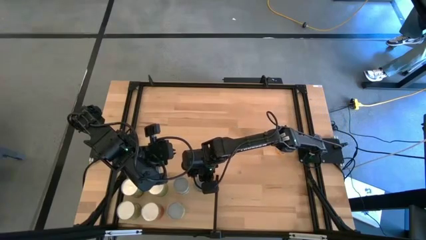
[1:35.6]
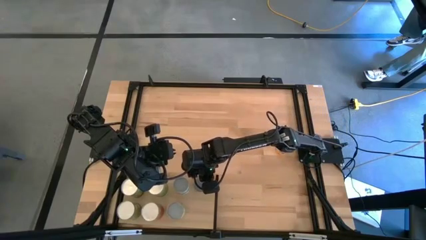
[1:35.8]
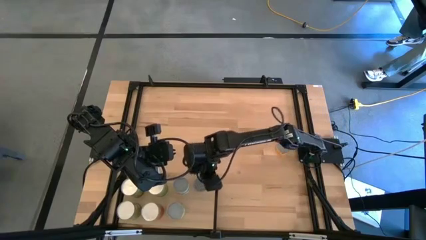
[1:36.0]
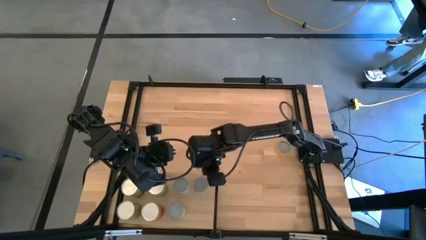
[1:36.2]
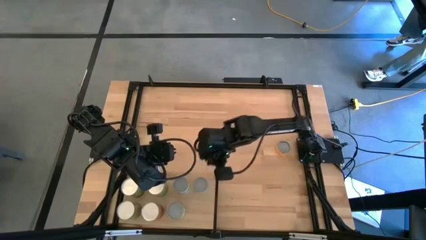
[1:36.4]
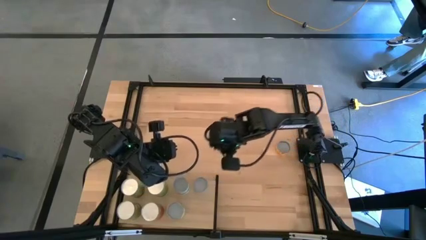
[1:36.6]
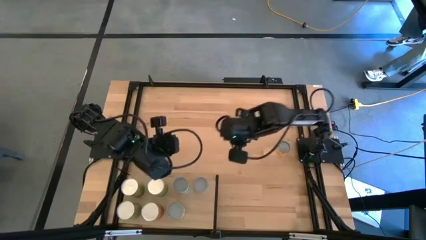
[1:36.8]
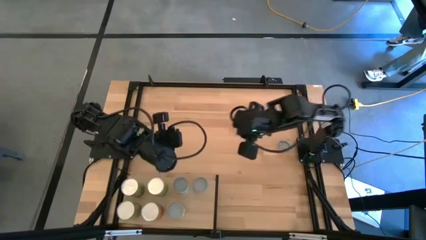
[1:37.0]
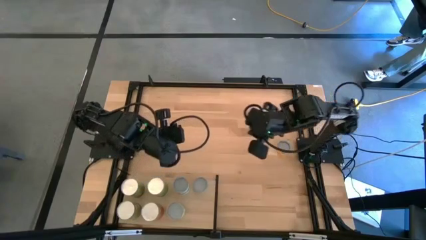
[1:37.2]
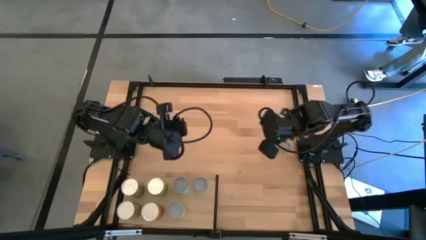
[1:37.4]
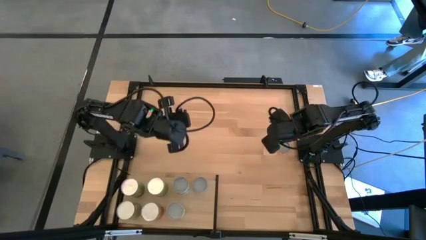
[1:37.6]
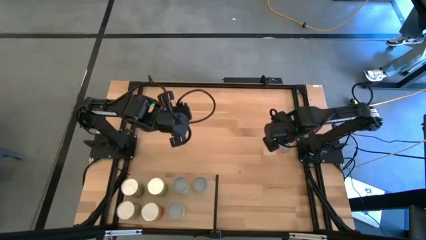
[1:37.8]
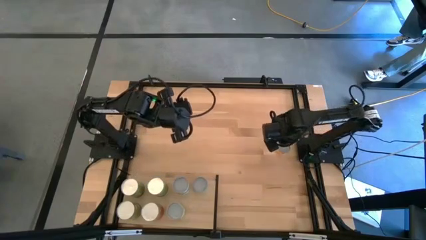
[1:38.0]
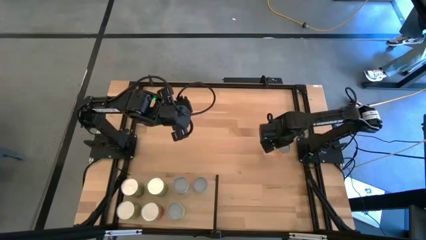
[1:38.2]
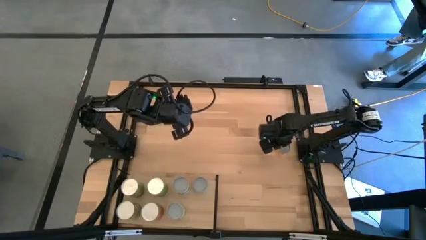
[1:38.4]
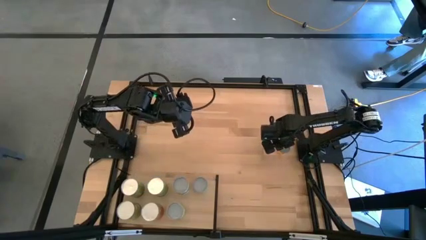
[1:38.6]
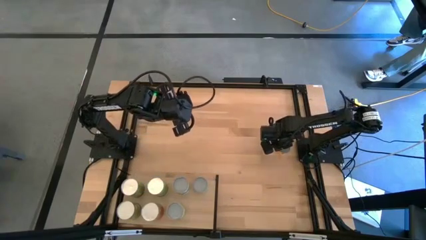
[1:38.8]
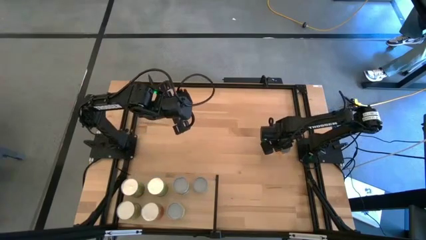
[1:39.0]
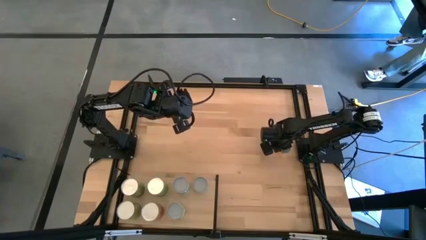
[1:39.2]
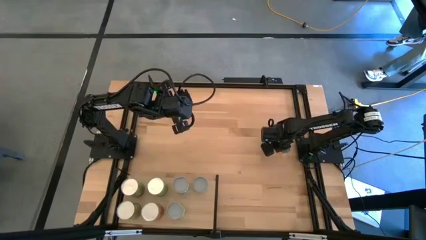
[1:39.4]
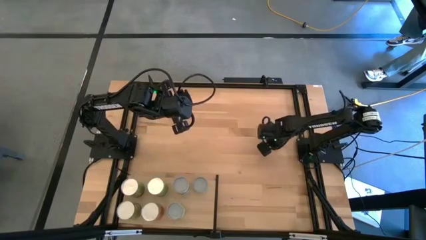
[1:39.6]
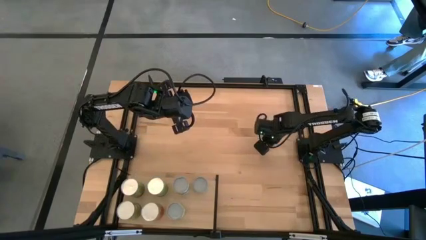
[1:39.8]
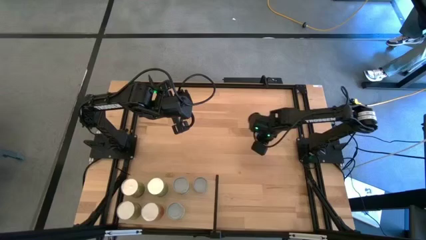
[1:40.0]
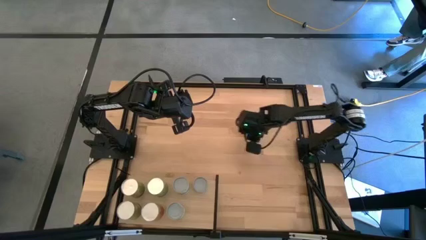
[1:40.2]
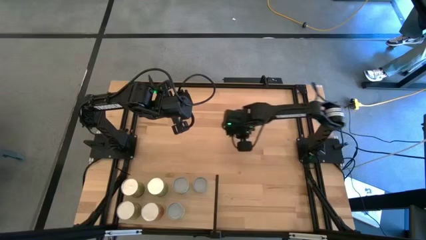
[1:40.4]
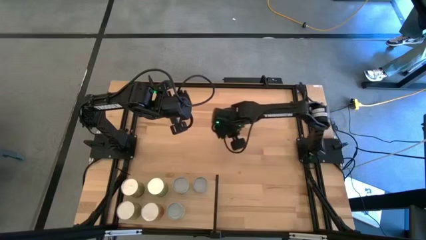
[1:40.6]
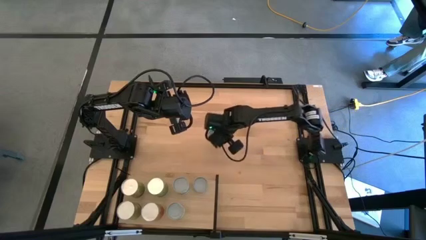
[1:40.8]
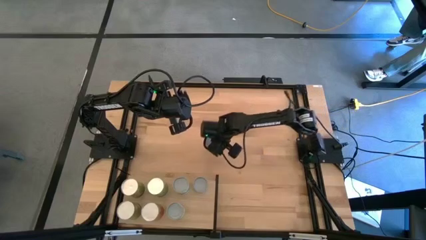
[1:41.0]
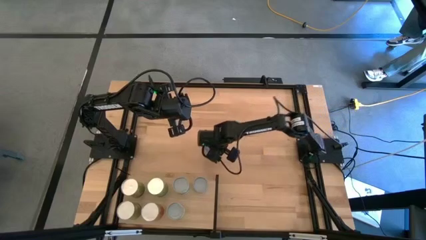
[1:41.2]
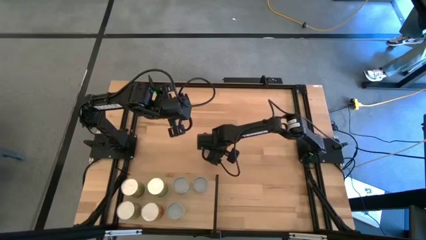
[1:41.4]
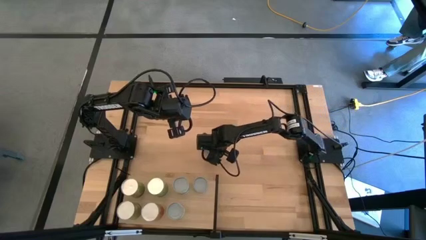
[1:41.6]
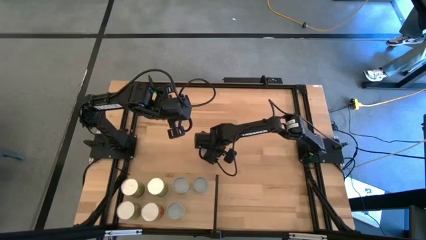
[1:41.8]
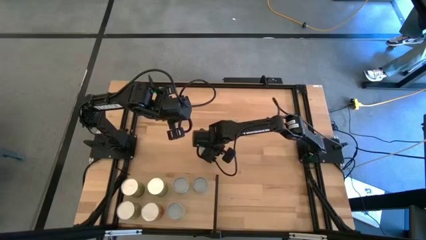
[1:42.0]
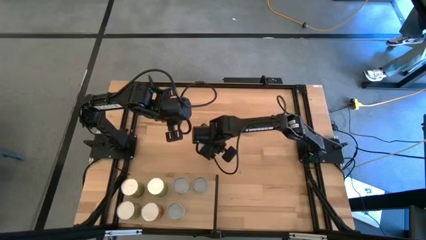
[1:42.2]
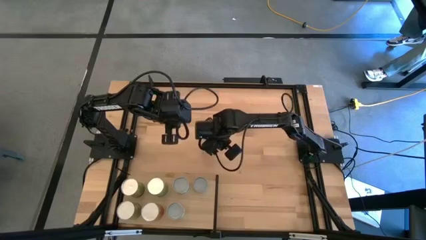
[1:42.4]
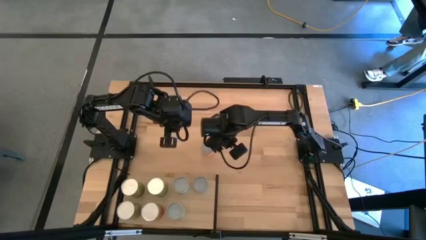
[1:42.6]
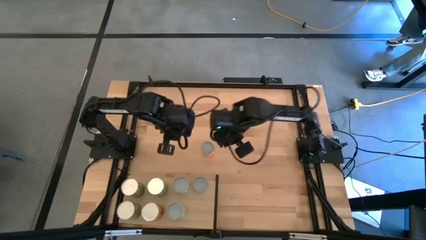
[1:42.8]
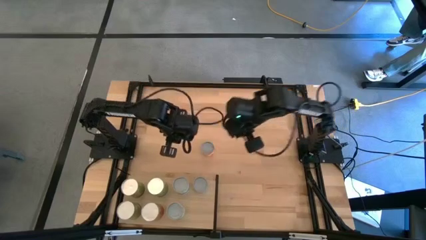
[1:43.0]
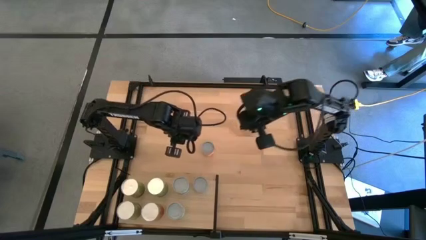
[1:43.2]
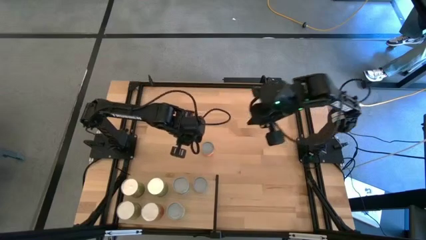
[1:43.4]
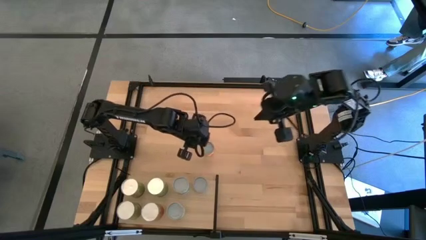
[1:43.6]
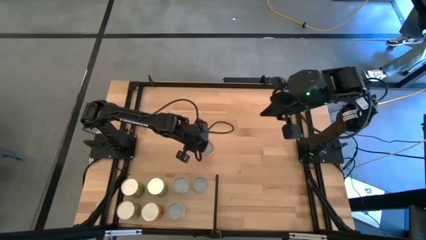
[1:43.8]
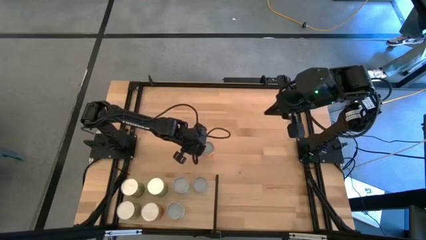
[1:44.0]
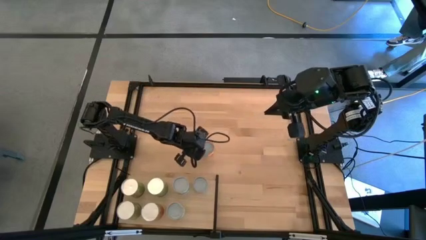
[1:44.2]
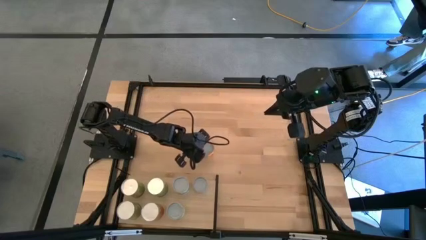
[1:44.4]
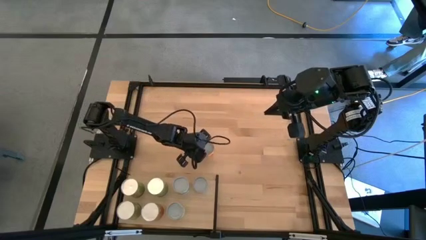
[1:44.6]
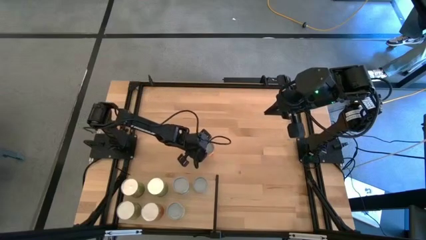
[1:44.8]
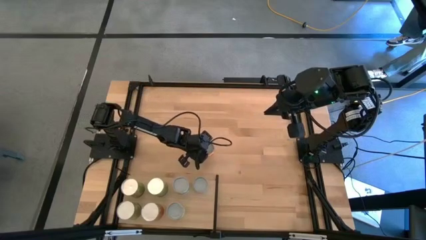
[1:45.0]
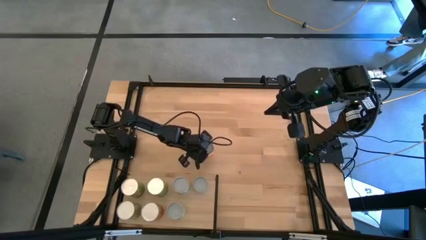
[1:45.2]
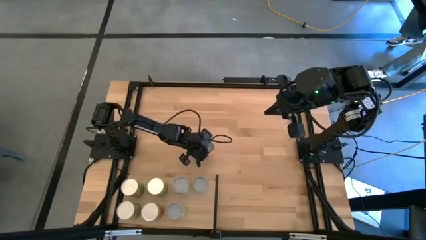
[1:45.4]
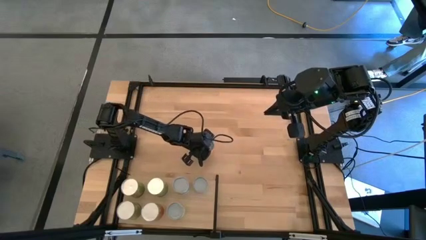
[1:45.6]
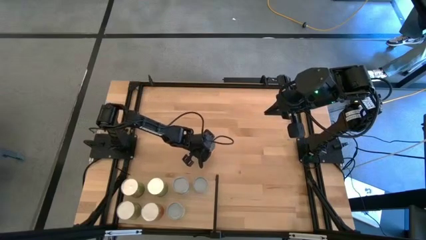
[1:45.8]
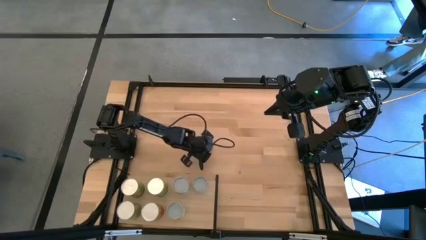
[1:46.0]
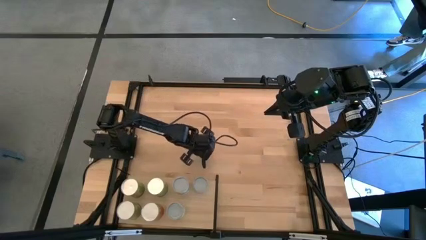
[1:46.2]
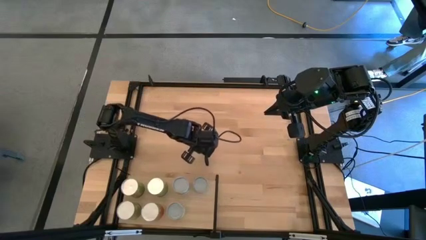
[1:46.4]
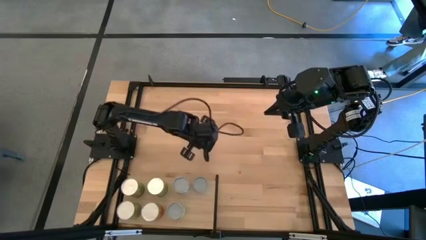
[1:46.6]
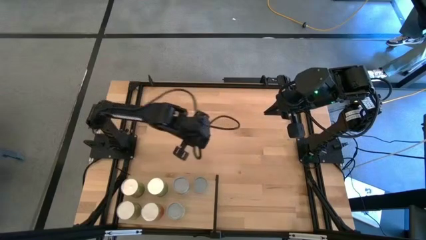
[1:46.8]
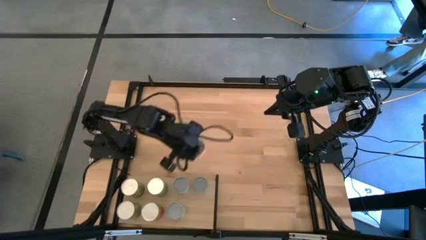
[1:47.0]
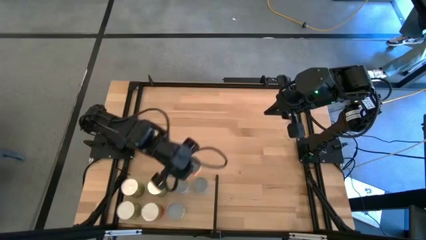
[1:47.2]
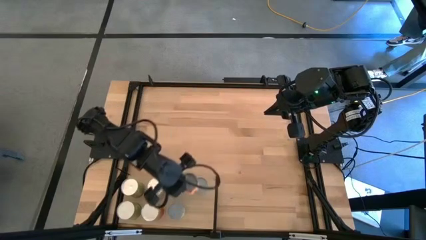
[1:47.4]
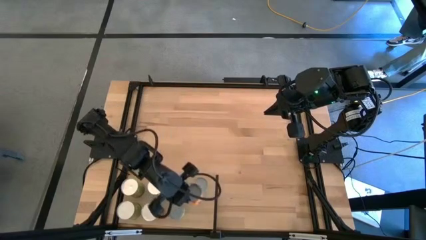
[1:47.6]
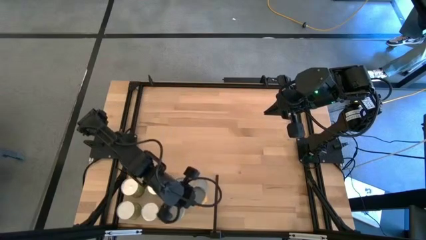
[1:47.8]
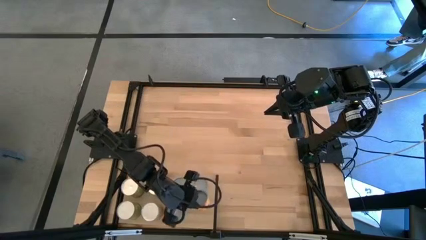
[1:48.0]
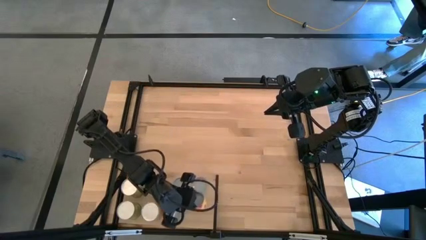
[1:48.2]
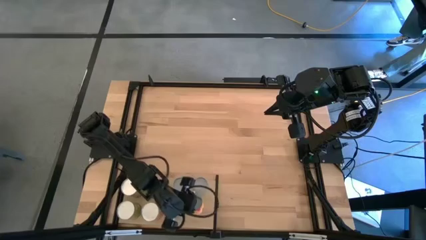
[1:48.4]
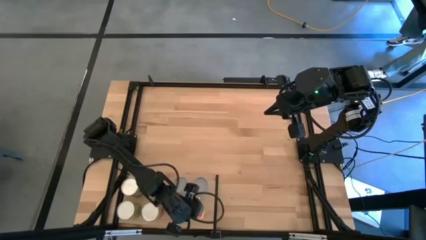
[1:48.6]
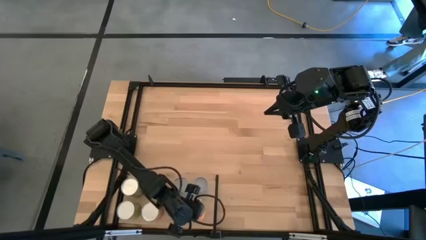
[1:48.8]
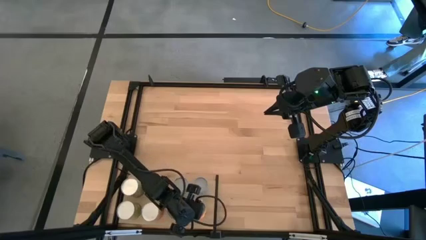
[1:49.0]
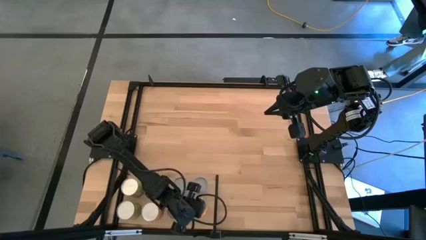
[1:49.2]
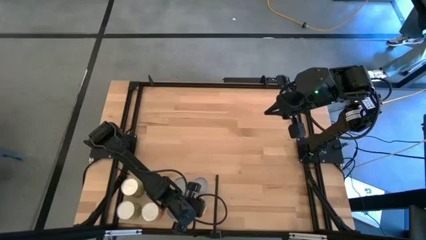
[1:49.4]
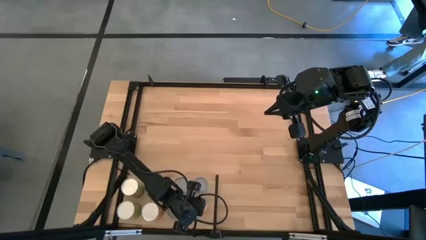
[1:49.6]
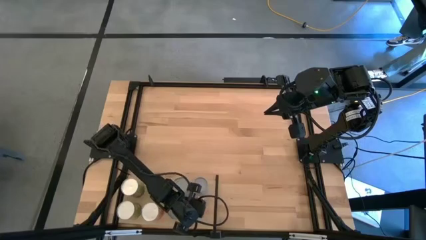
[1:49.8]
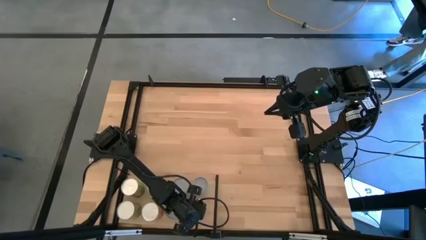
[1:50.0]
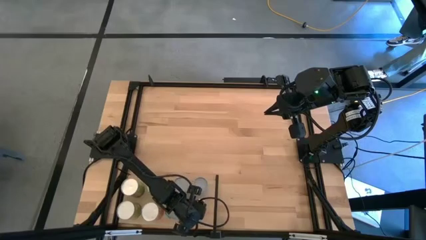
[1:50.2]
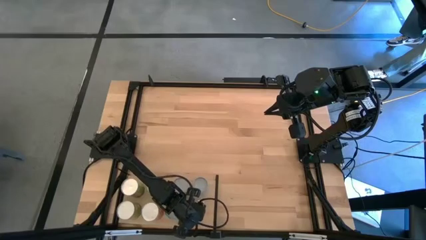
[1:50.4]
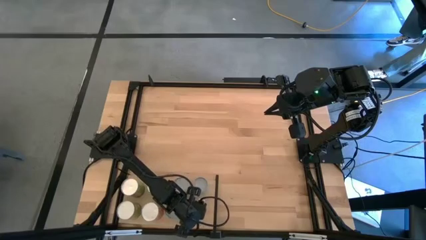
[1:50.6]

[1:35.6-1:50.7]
Task: Pick and place cans onto a shelf
Put the canned pineapple rings on the shelf

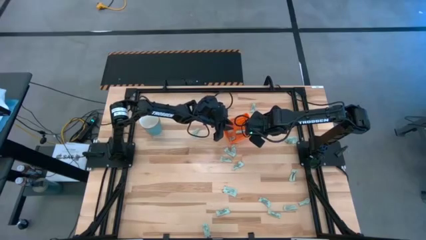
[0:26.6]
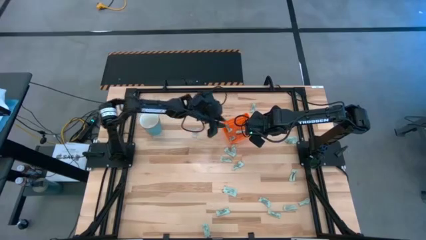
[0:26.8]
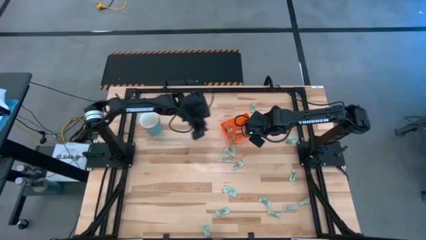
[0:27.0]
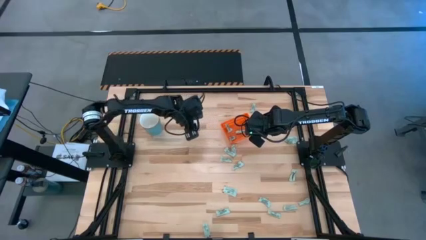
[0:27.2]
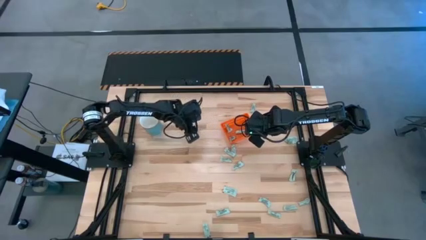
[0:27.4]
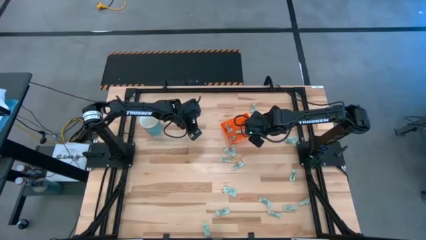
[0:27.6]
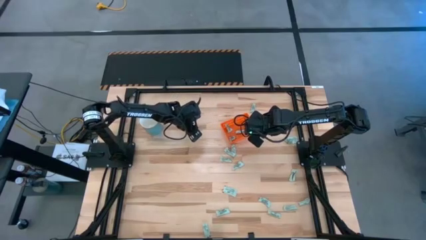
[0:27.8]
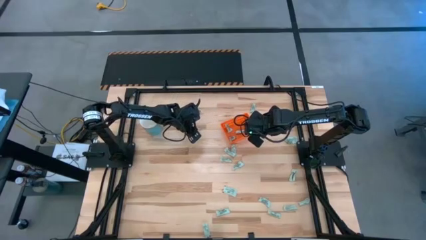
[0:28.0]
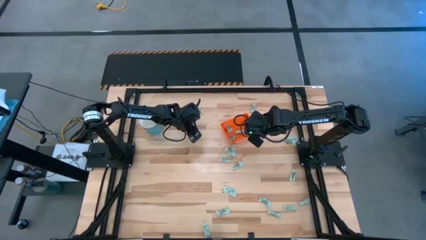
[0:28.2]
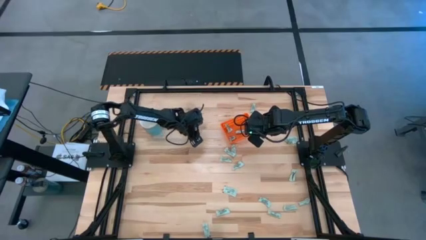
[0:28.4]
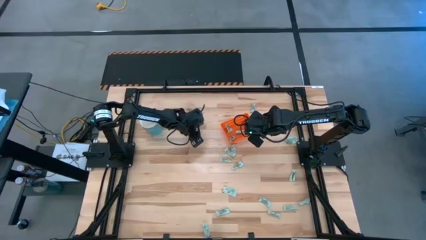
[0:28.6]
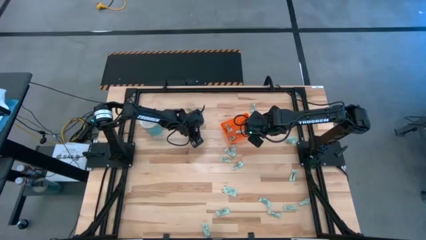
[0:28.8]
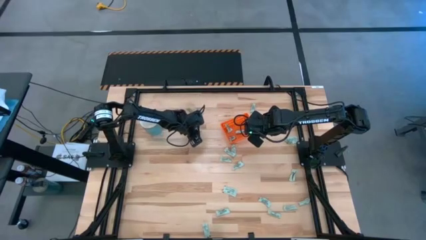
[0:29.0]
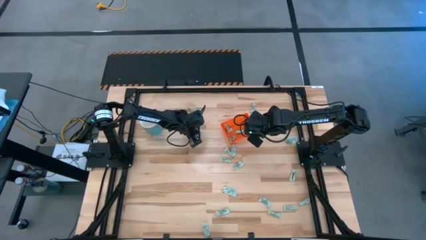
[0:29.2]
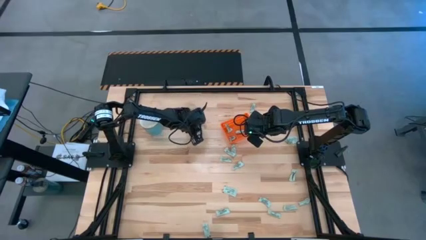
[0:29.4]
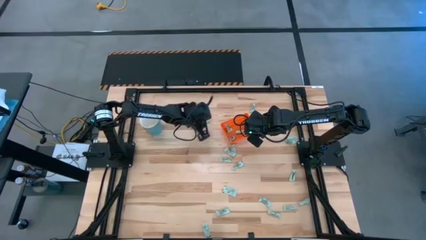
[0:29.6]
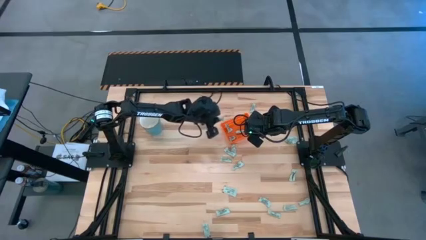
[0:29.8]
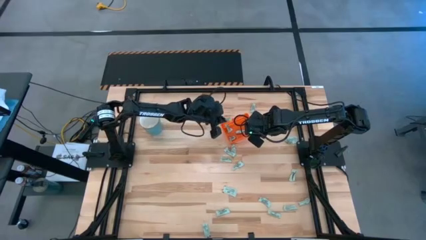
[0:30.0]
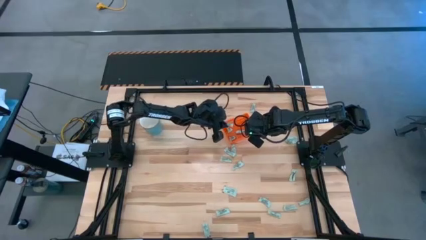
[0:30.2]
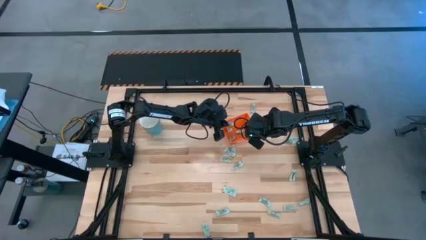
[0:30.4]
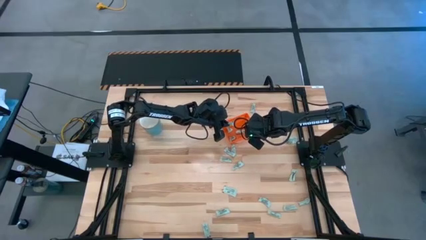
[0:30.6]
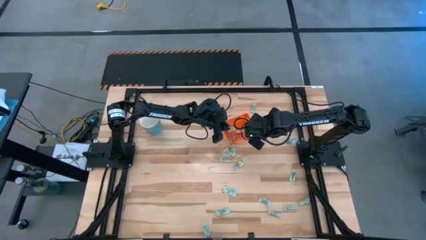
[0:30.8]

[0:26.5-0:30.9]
Task: Pick and place Stevia / Truvia into bins
Put the stevia packet into the bin
